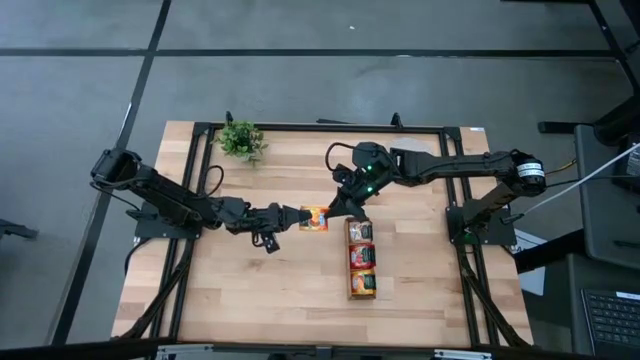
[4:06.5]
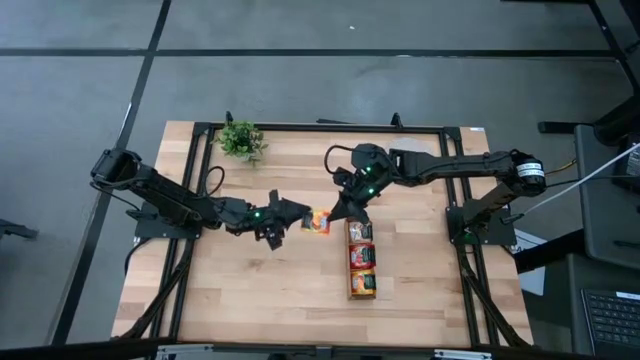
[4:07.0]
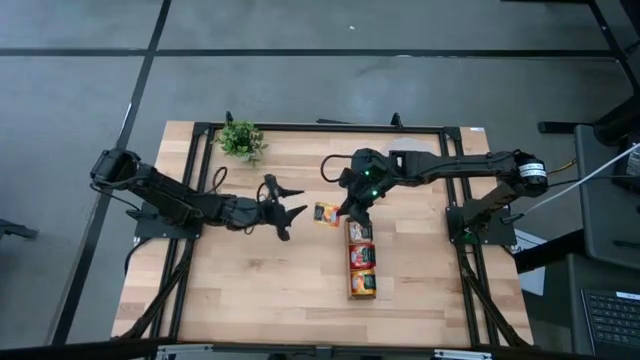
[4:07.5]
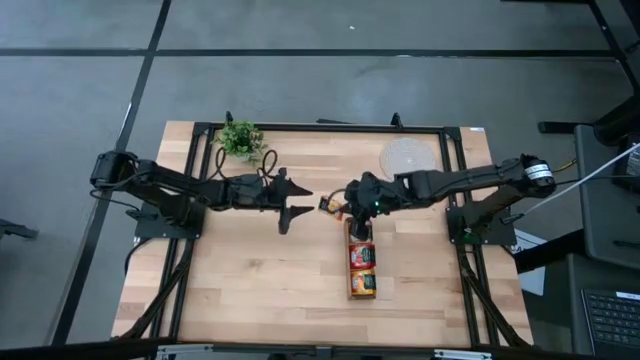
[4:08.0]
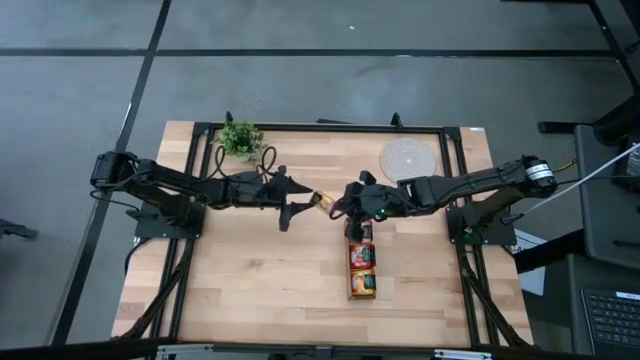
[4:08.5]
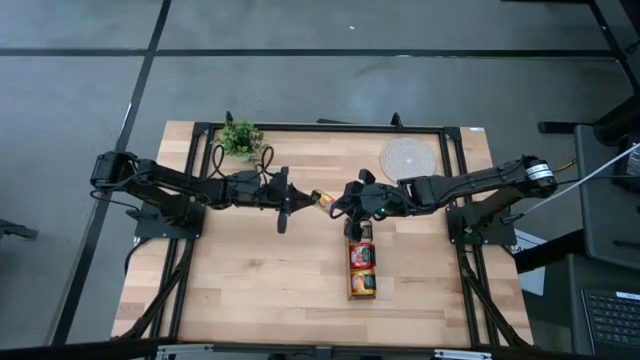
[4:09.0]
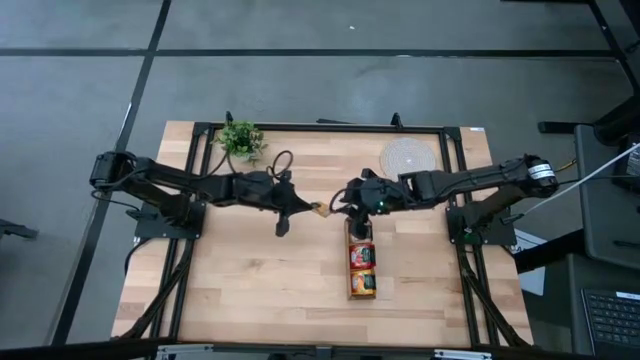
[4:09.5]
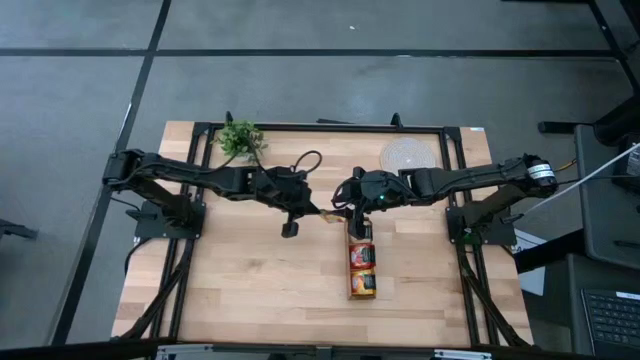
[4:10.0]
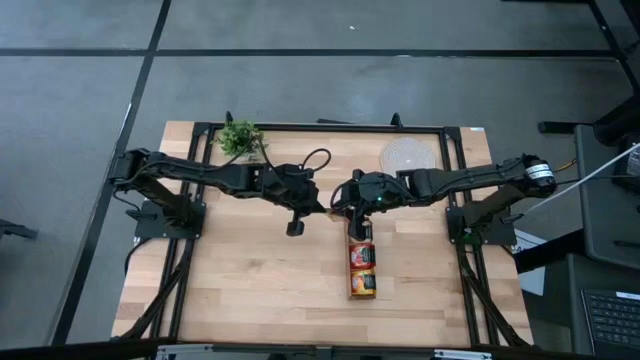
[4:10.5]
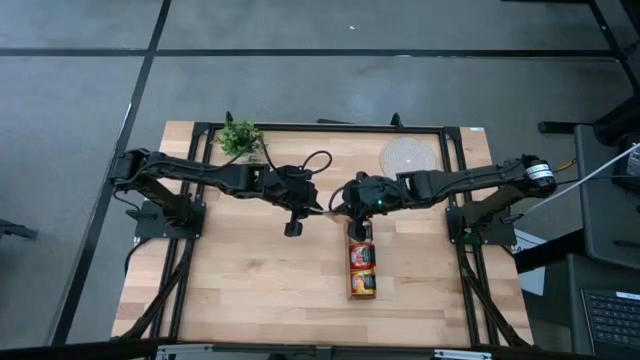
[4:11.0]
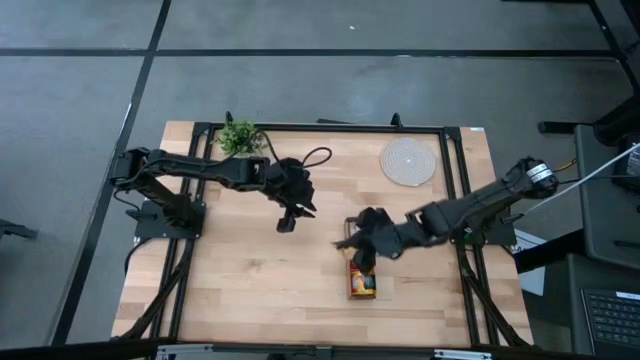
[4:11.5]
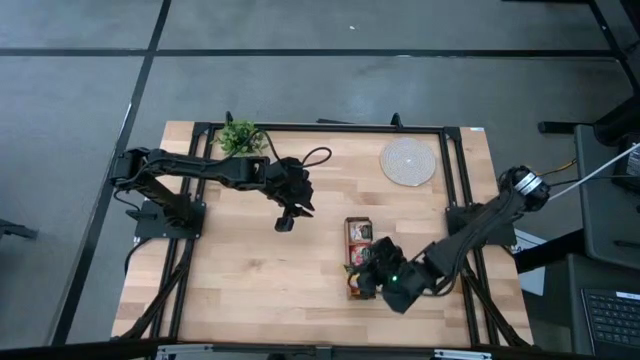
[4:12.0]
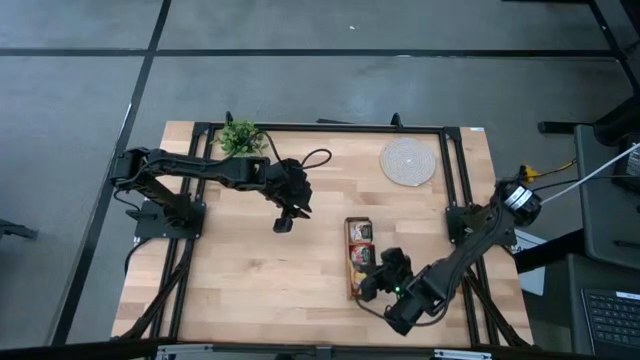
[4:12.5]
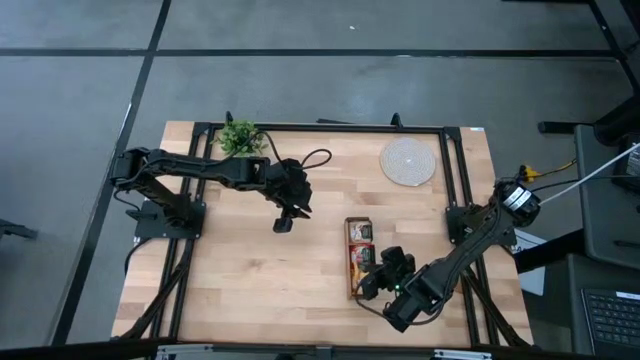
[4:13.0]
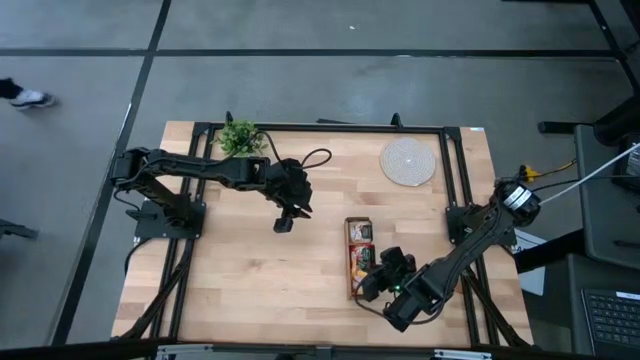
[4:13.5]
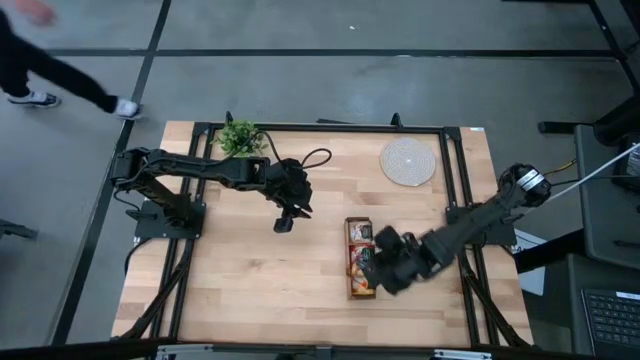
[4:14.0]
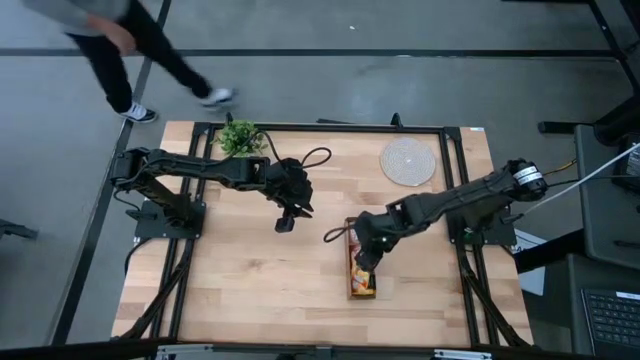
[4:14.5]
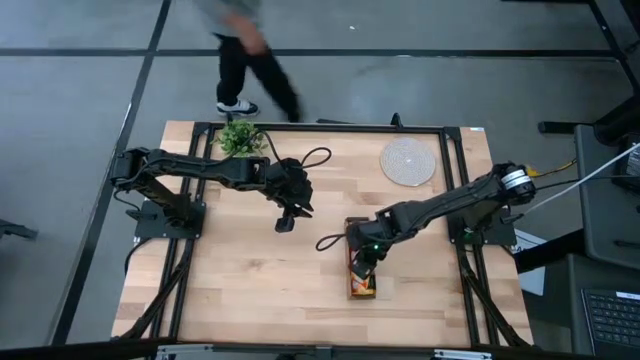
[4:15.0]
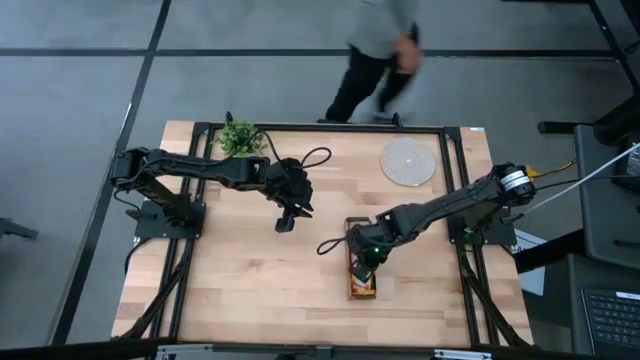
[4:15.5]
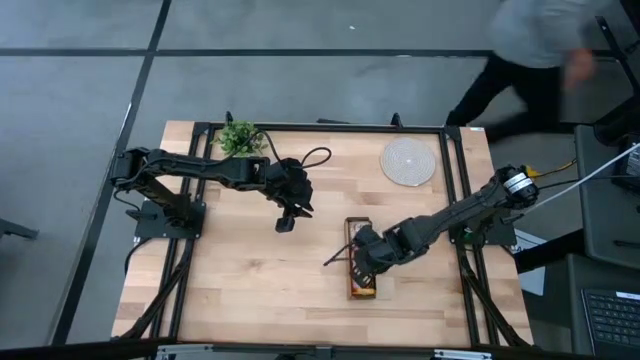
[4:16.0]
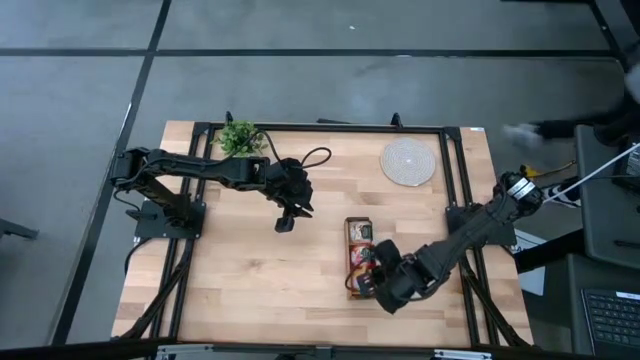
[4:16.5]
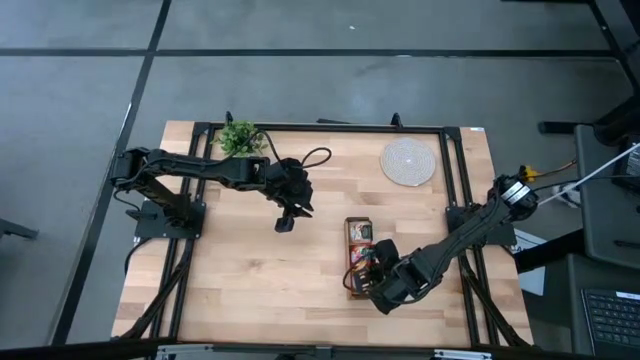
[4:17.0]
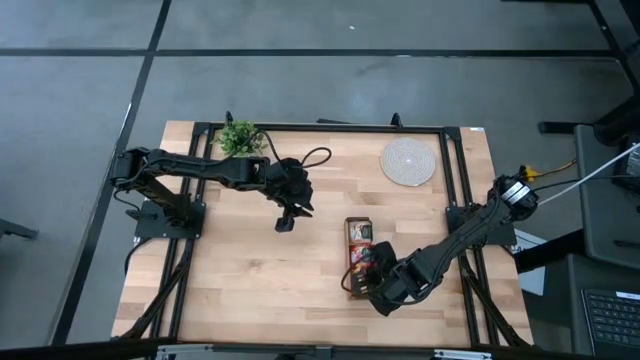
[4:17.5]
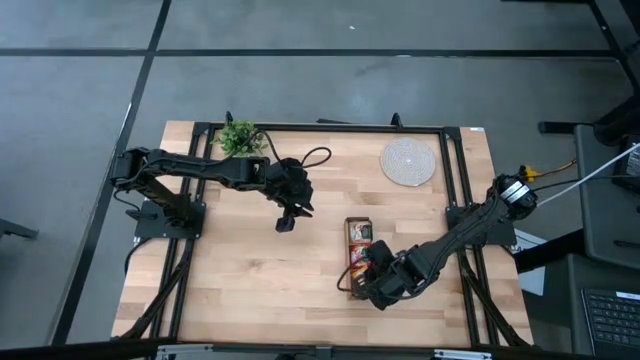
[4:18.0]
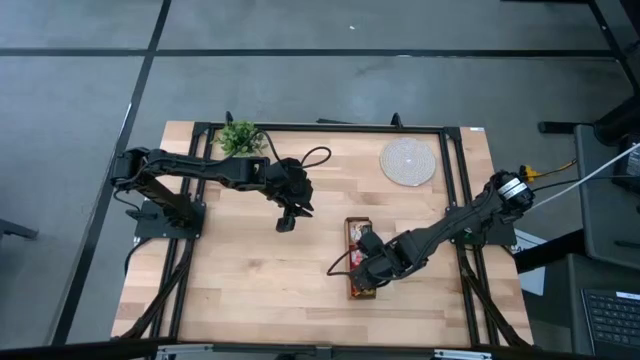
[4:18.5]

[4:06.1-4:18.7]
Task: Pick & Place Tea
Put the yellow tea bag into the right section of the wooden organizer

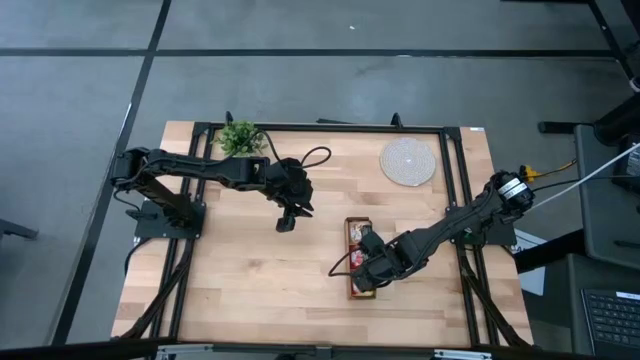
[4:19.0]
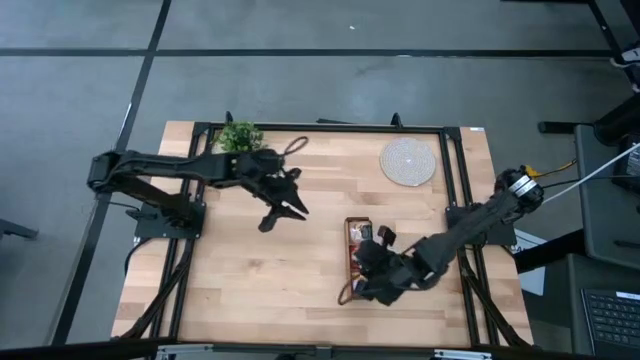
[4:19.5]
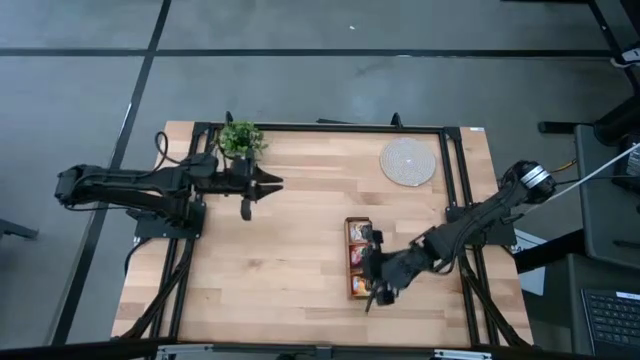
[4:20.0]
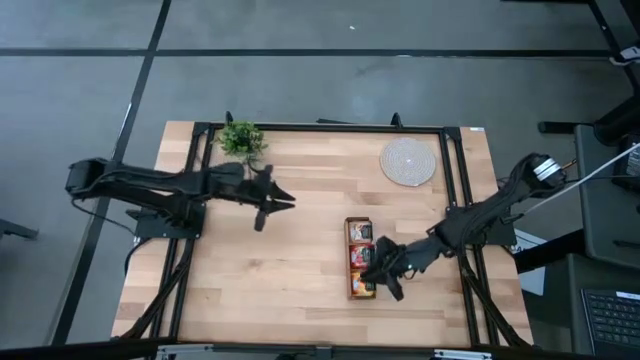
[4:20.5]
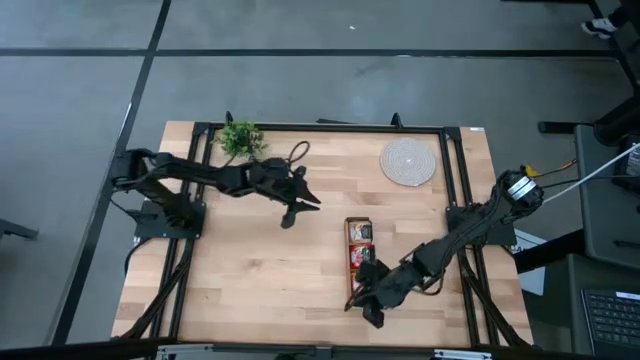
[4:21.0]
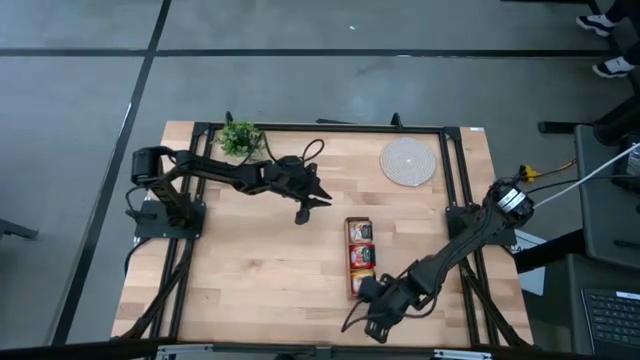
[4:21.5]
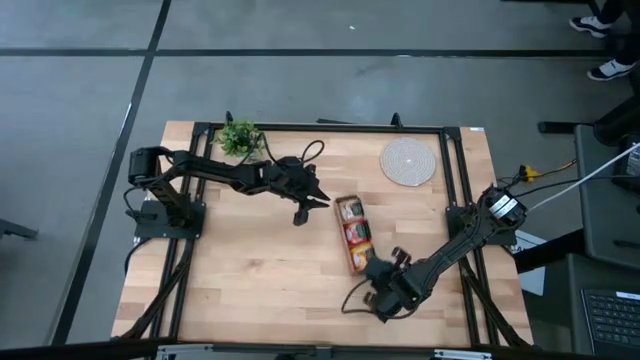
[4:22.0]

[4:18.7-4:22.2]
Adjust the wooden organizer

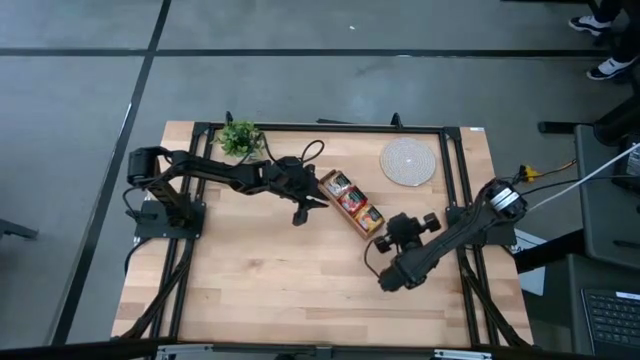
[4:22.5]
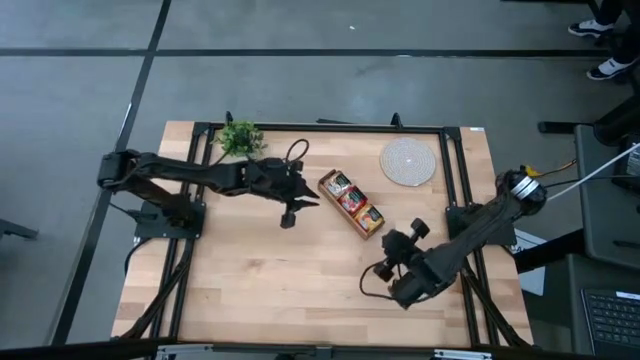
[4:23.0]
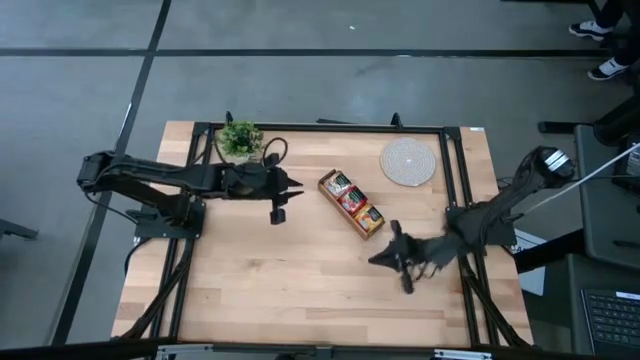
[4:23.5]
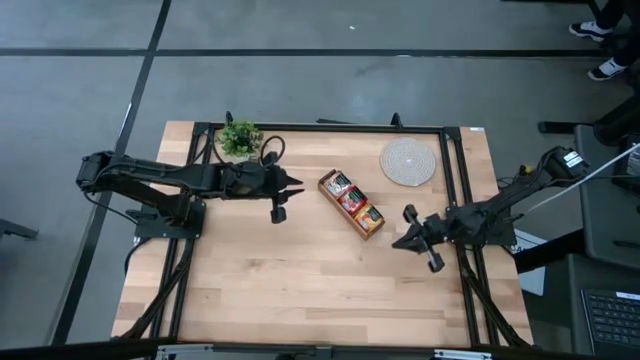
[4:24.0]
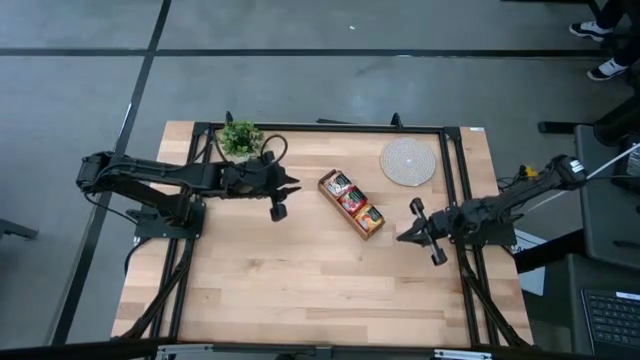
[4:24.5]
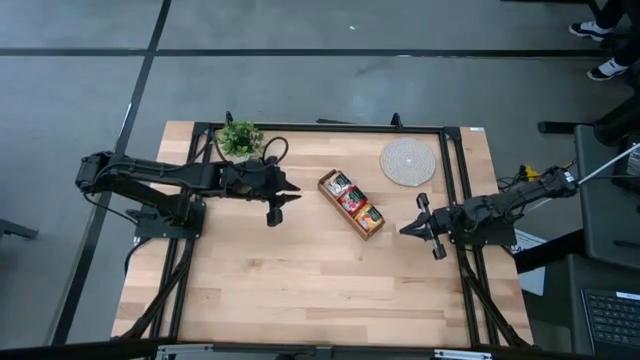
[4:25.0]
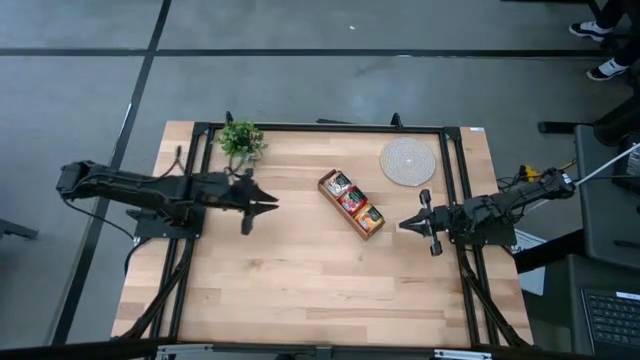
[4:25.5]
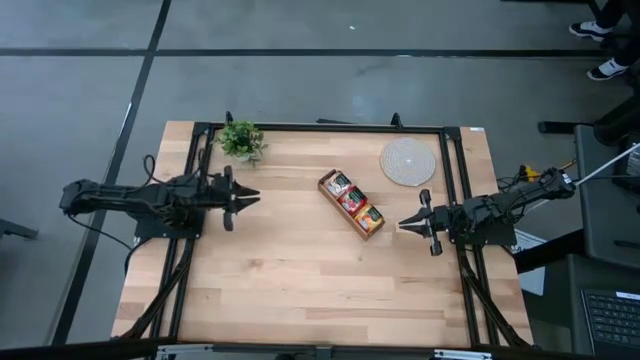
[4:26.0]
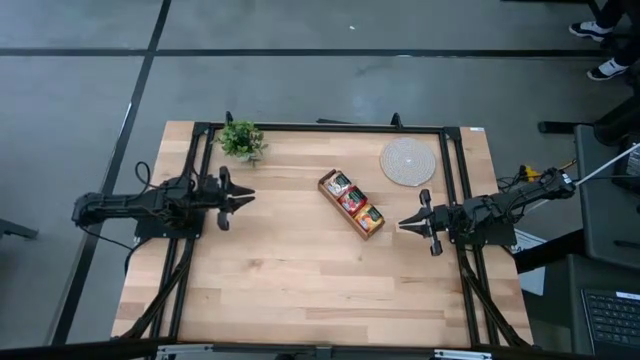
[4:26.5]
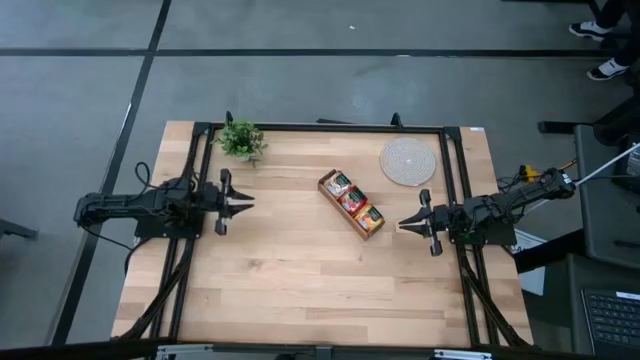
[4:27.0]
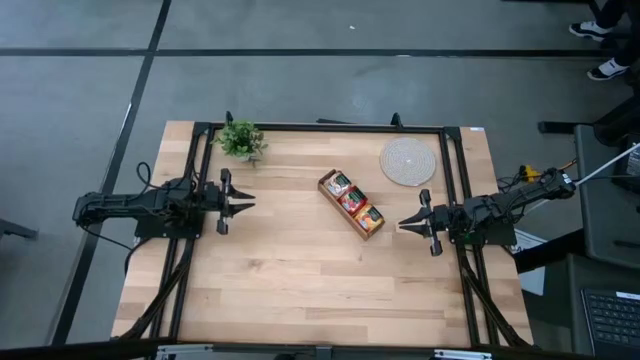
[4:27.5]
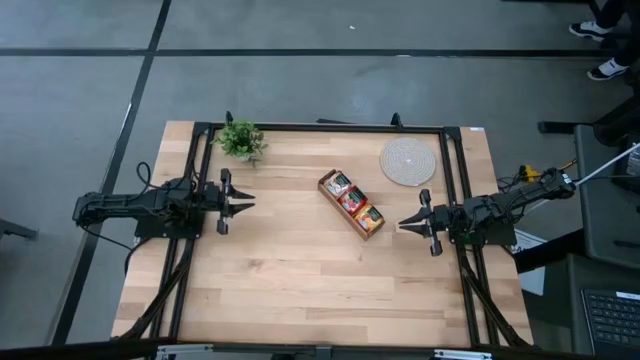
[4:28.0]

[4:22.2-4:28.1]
Return to Home Position
